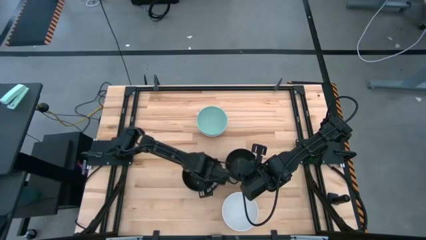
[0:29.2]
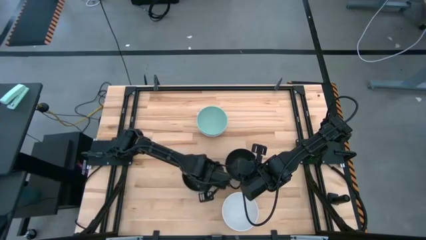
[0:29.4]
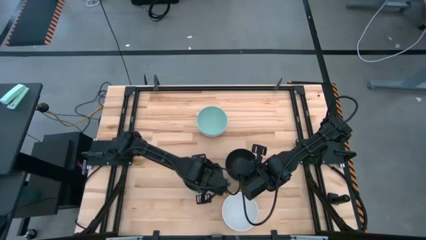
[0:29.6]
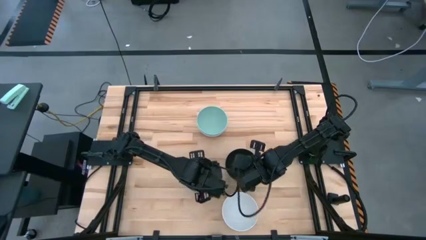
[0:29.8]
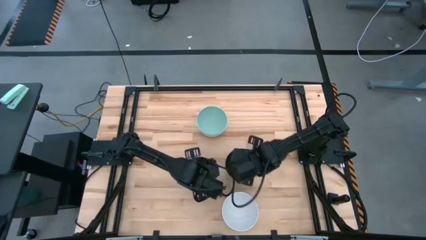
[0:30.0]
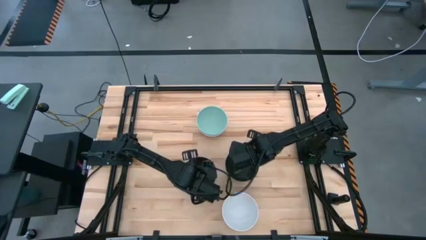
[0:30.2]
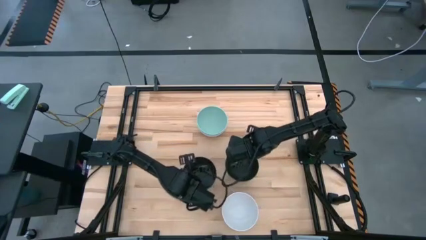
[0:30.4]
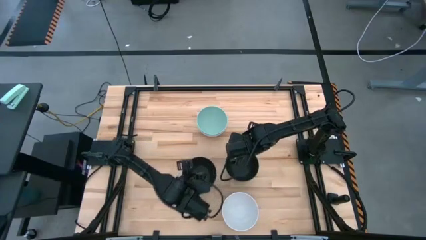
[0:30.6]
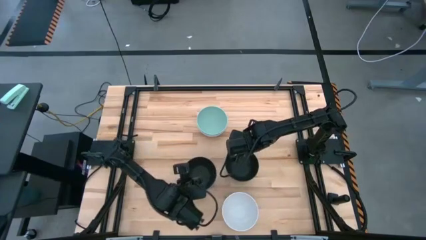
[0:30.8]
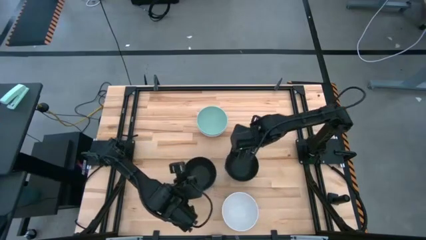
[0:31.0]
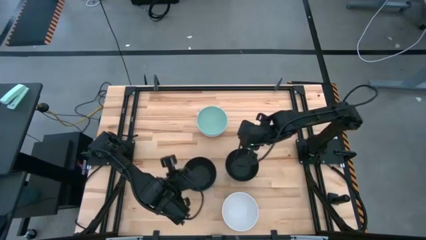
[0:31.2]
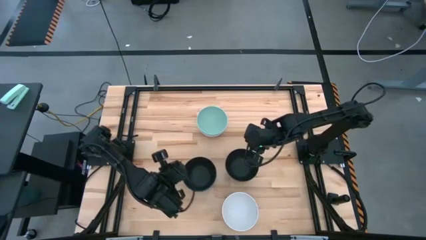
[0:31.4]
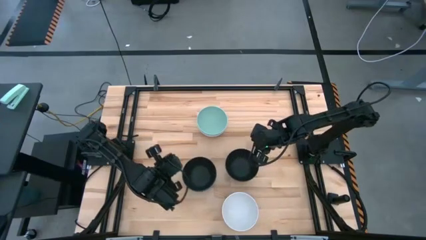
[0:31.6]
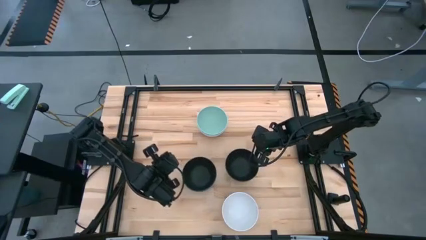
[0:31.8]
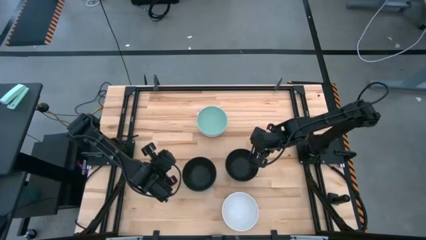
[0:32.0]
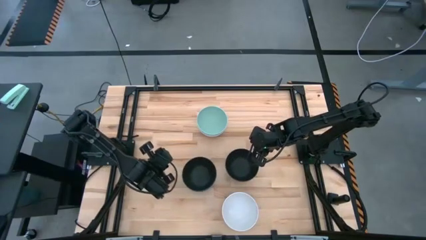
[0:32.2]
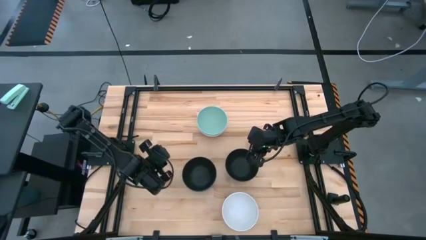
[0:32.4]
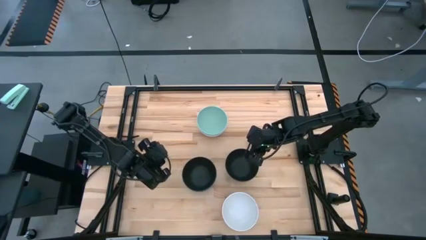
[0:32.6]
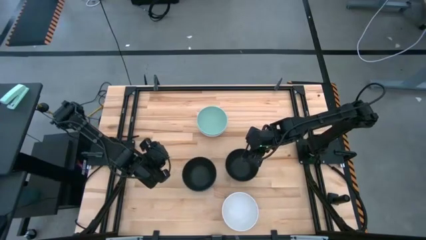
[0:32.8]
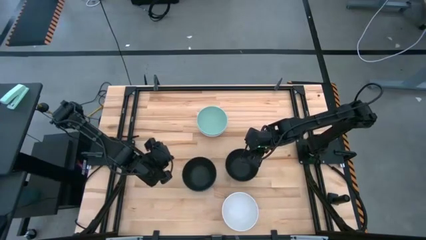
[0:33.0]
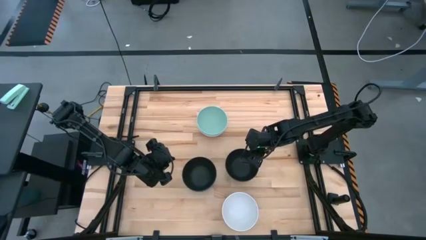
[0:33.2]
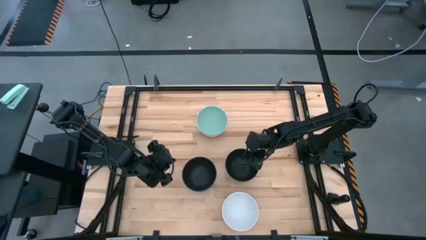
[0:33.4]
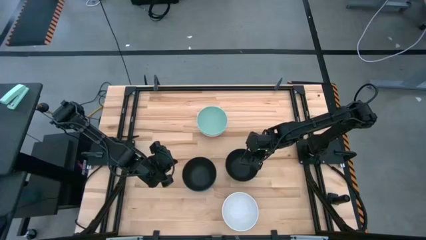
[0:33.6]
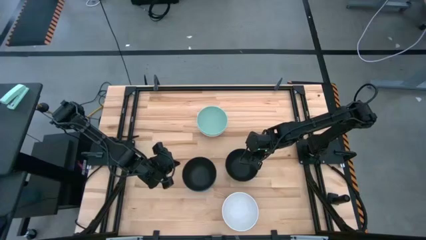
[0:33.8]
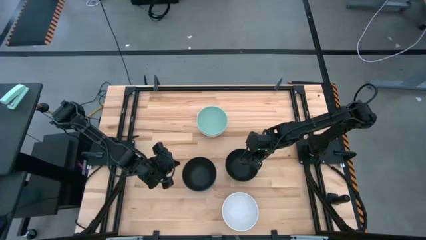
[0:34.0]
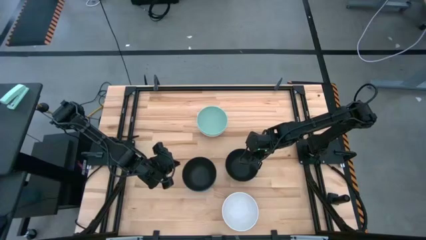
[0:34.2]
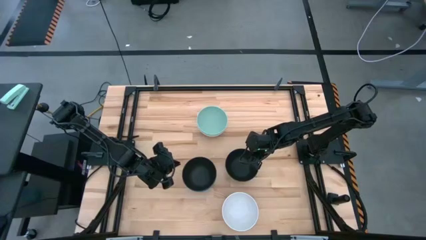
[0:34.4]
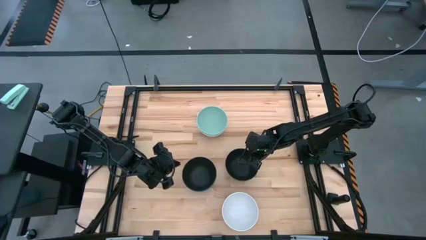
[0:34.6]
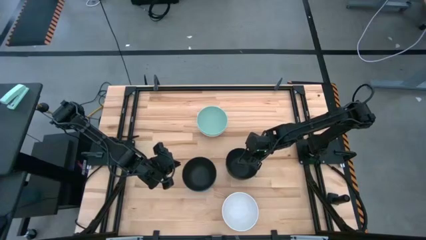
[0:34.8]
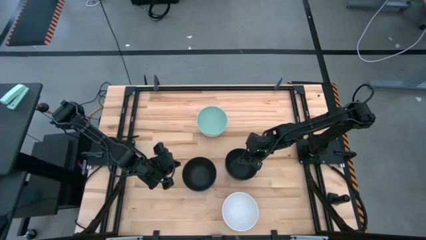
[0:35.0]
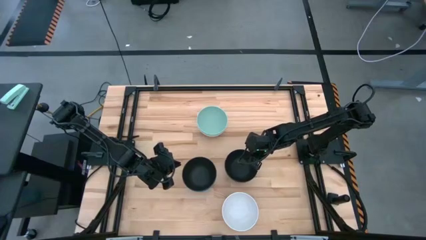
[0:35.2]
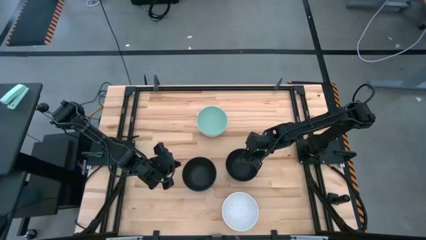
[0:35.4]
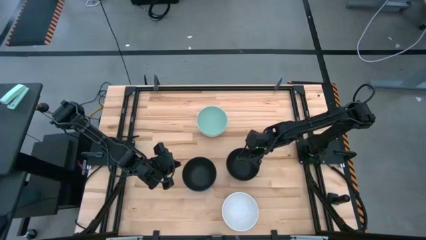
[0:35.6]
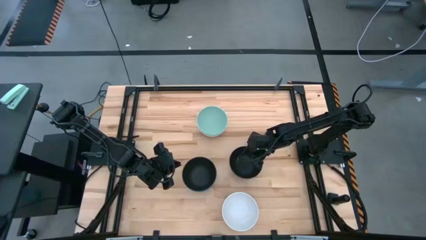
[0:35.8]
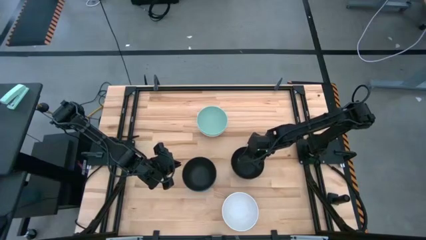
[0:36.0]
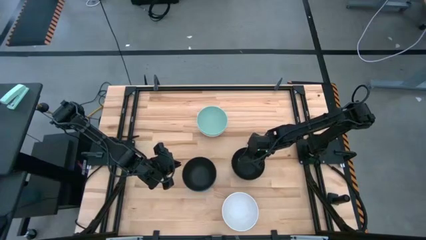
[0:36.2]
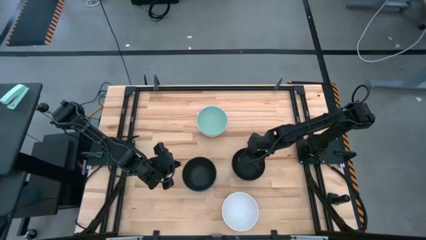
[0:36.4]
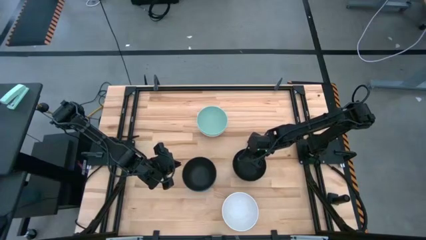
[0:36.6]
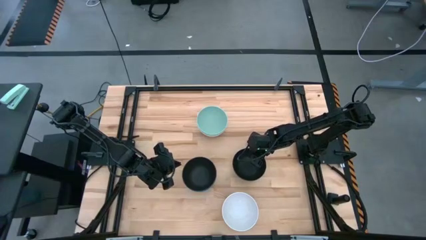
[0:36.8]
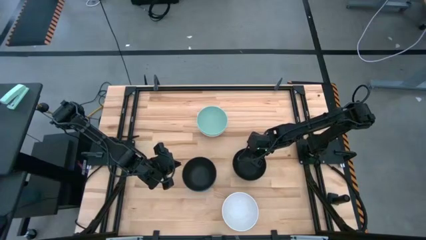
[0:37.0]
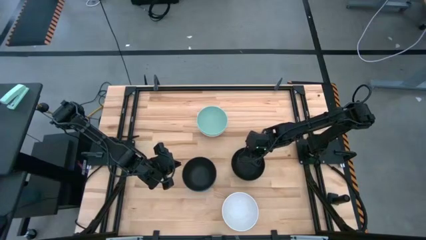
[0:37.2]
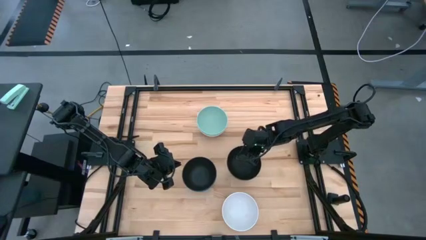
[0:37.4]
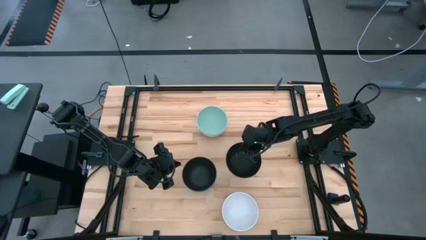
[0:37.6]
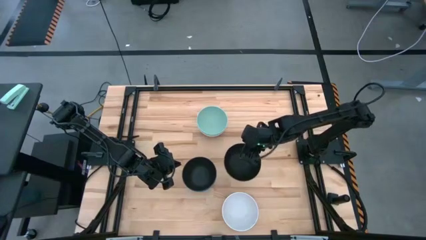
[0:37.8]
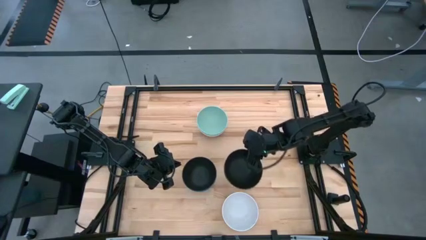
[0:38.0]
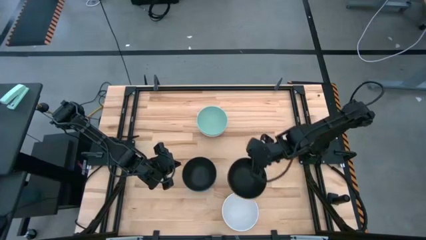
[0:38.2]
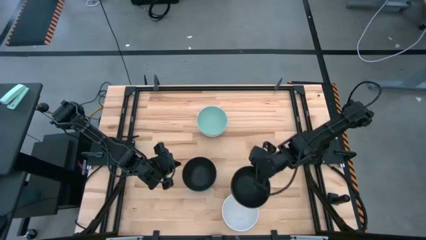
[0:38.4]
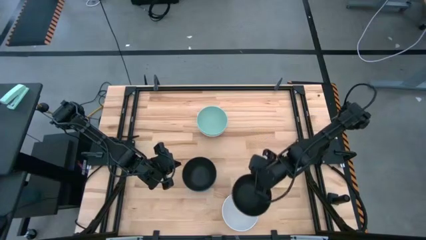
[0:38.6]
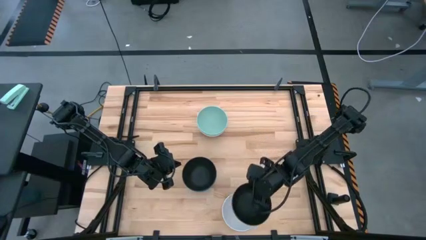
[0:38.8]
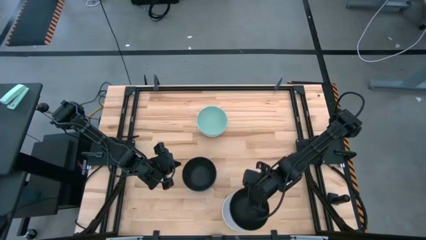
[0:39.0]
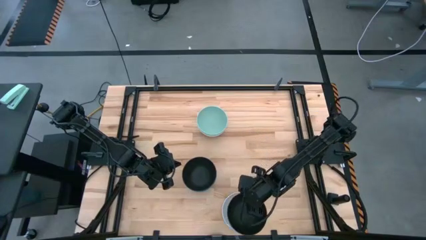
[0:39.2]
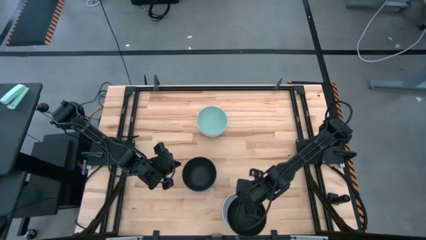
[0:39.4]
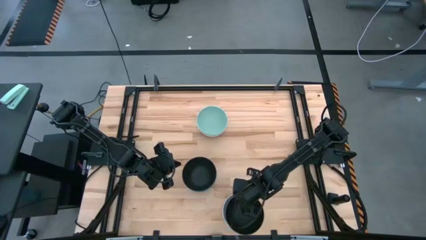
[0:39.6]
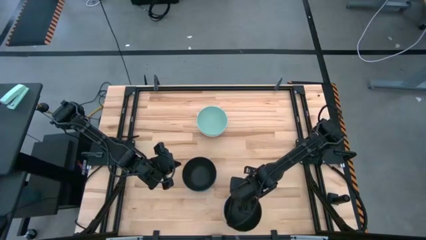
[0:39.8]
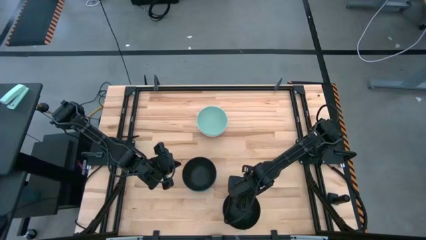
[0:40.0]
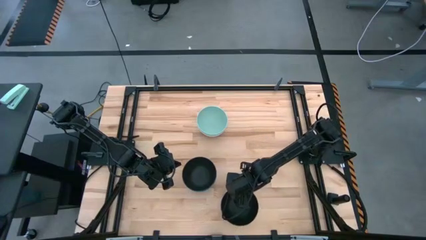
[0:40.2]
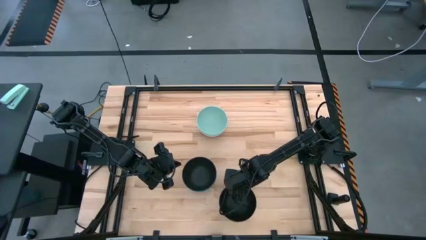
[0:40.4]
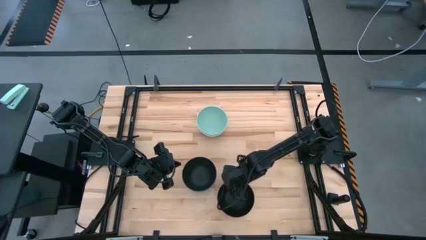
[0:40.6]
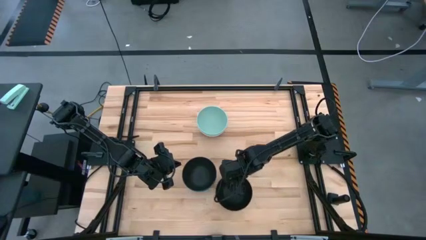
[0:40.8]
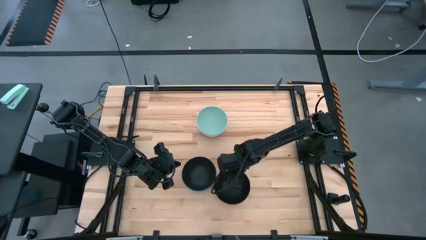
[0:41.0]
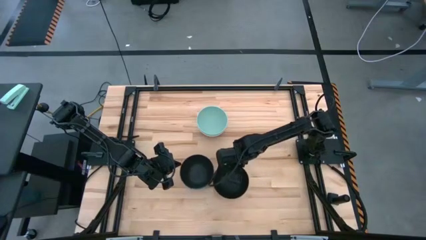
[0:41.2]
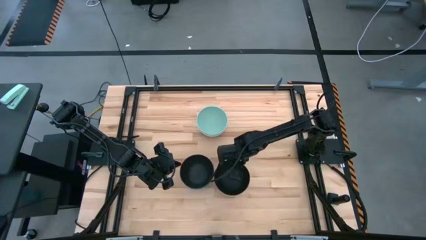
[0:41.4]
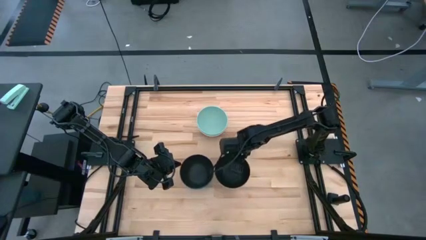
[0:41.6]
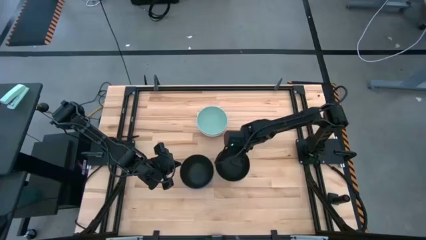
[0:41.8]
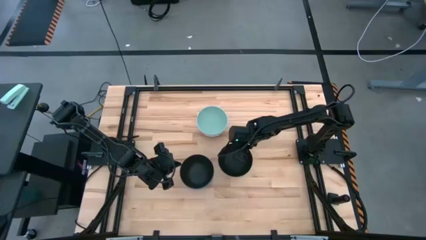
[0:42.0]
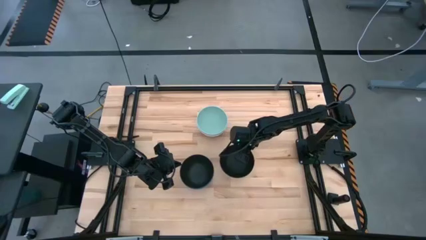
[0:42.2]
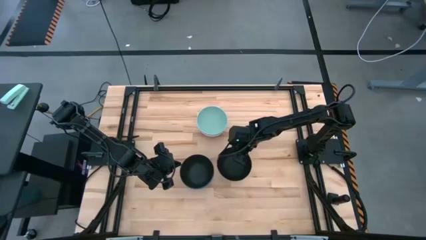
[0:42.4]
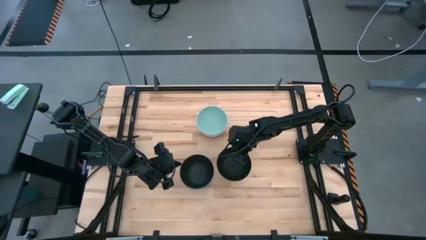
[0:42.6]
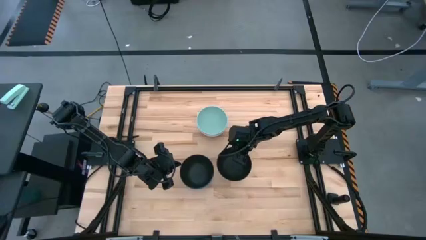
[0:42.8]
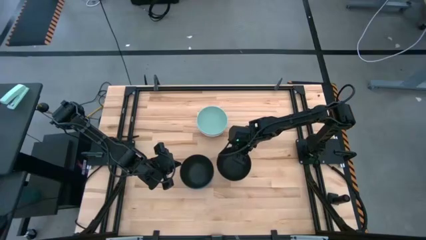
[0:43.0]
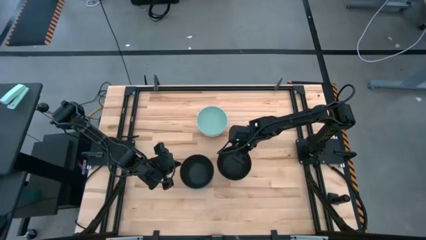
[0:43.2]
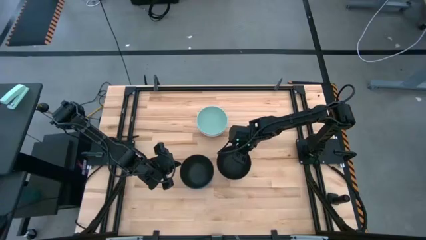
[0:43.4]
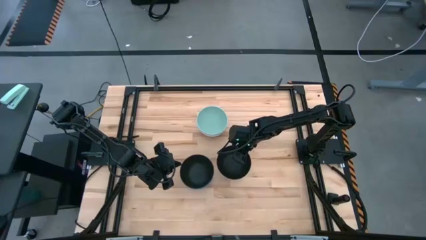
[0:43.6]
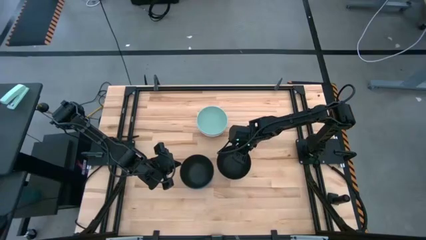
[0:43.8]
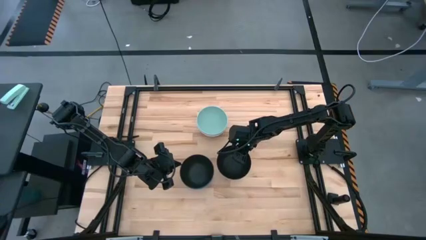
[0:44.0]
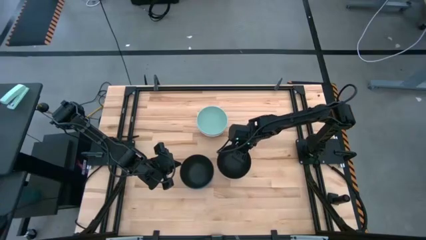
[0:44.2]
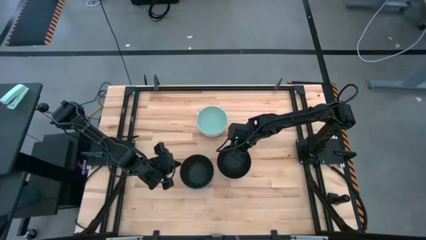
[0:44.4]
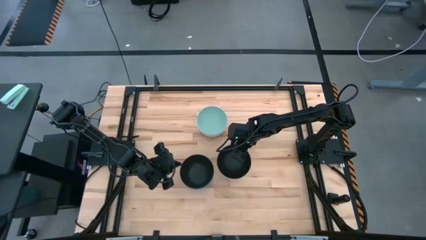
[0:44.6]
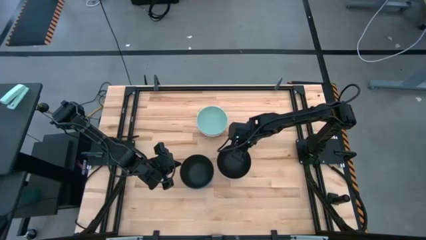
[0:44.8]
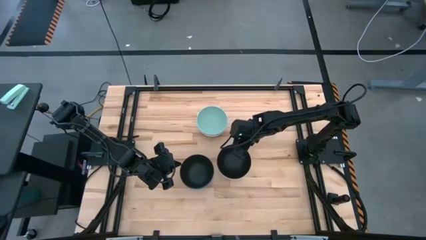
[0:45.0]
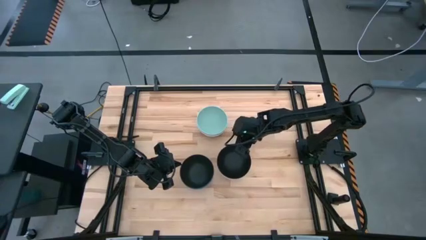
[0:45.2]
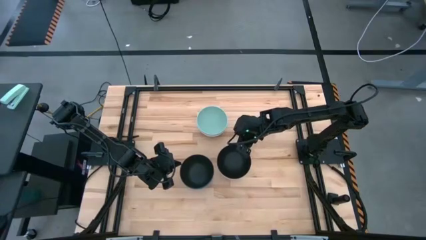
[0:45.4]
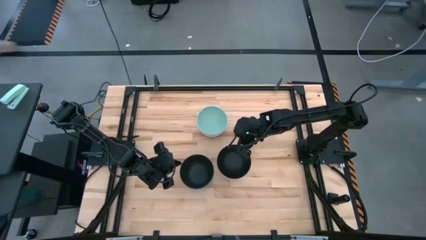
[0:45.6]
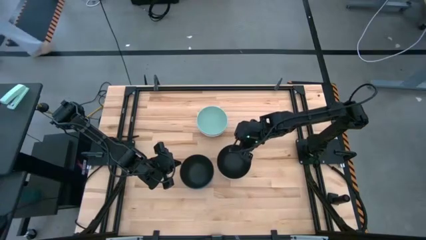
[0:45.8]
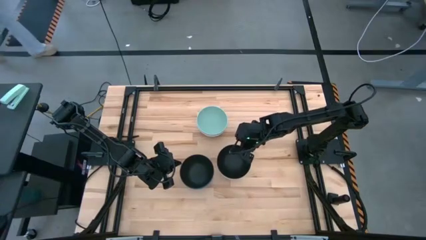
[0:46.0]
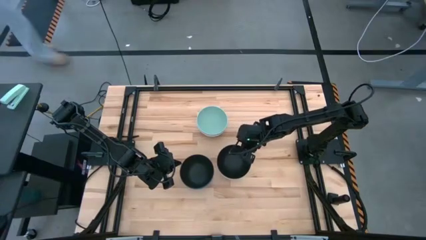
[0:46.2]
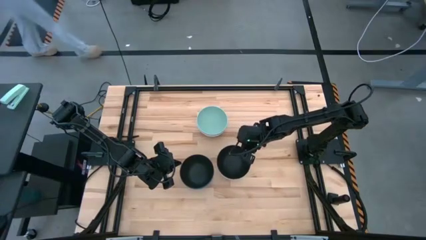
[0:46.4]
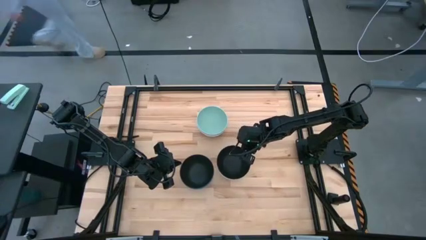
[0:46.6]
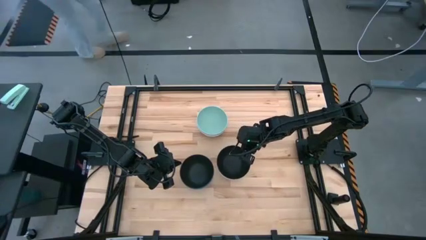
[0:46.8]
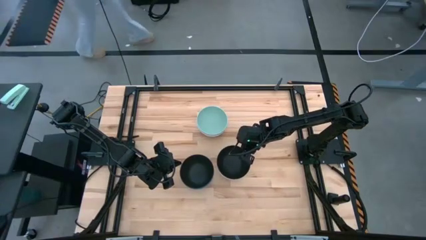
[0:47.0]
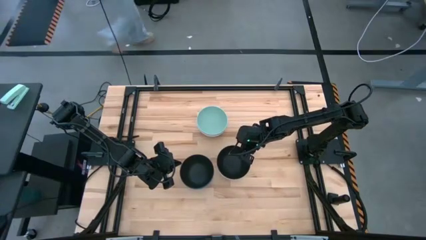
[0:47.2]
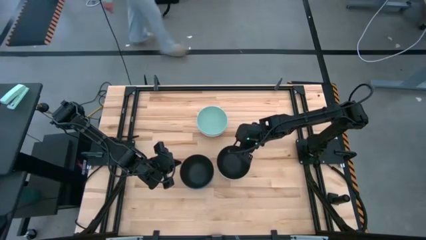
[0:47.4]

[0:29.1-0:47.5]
Task: Nest bowls inside each other
Stack the right black bowl on top of the white bowl
